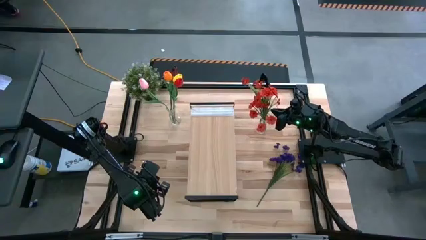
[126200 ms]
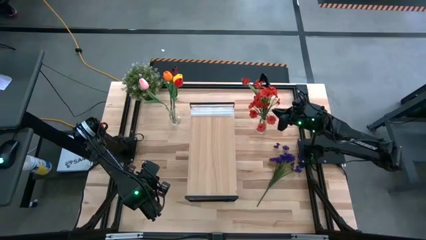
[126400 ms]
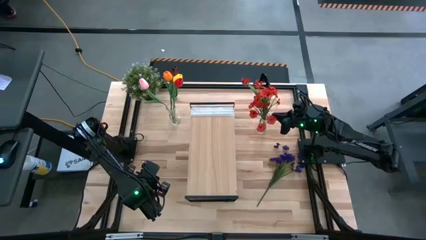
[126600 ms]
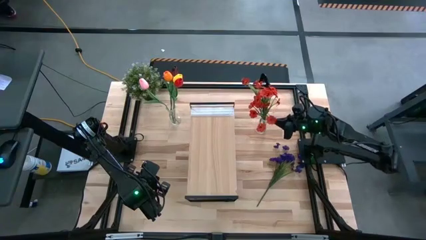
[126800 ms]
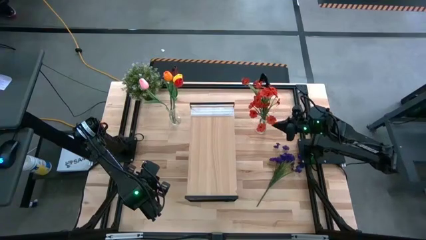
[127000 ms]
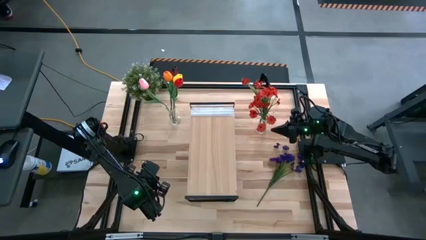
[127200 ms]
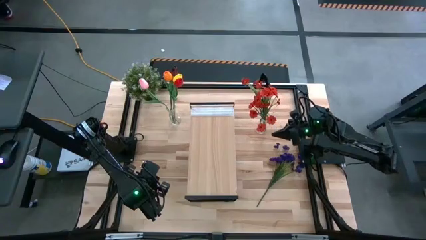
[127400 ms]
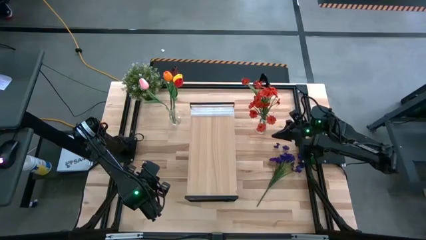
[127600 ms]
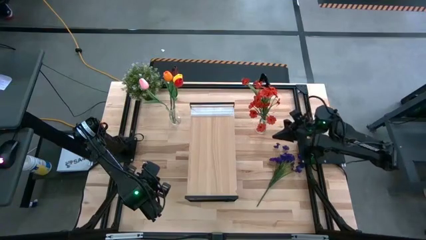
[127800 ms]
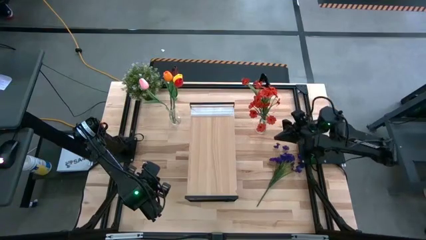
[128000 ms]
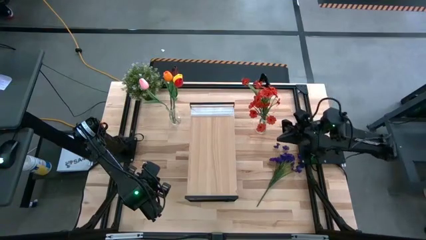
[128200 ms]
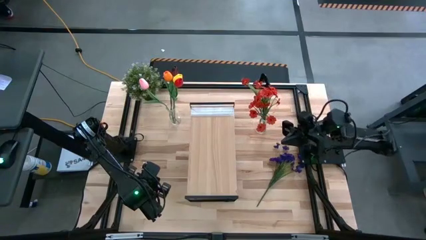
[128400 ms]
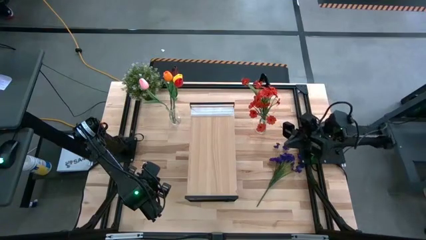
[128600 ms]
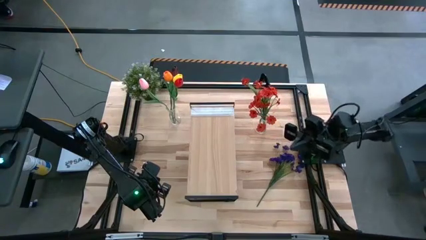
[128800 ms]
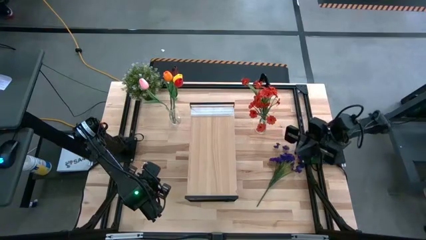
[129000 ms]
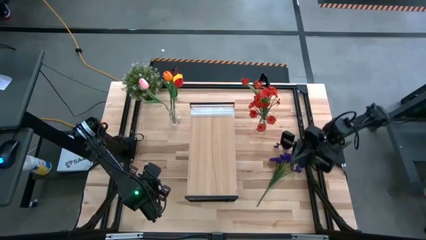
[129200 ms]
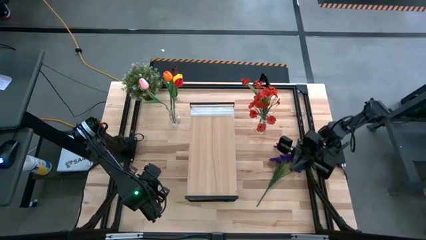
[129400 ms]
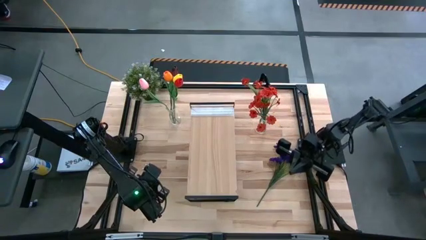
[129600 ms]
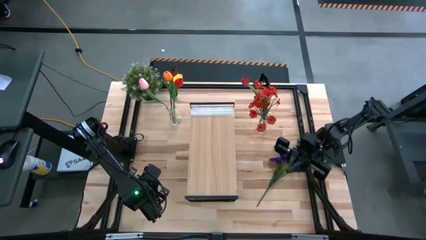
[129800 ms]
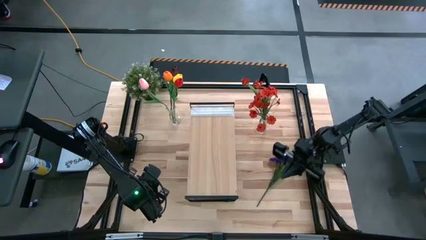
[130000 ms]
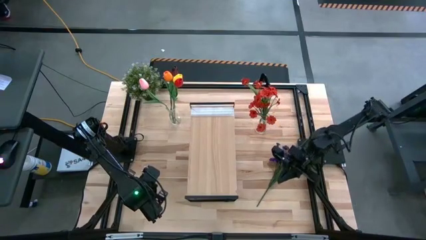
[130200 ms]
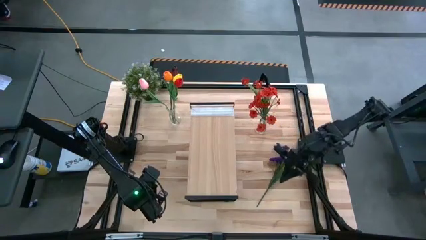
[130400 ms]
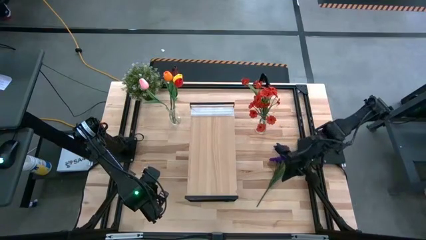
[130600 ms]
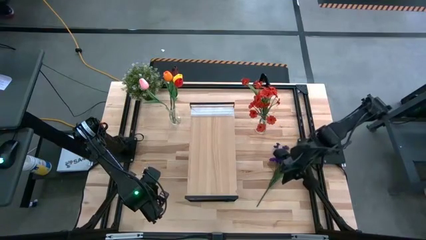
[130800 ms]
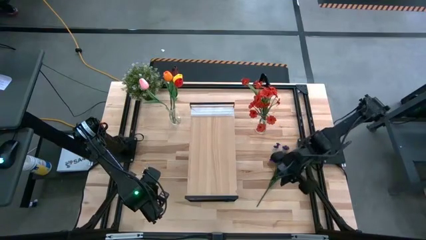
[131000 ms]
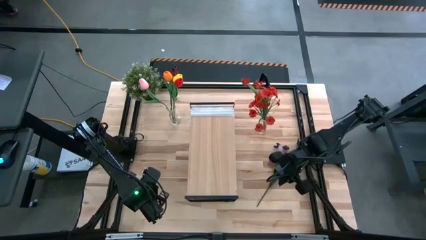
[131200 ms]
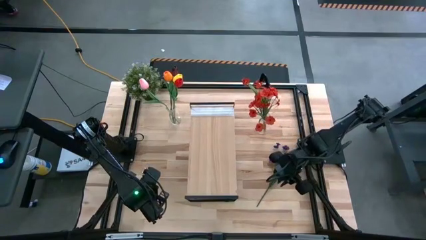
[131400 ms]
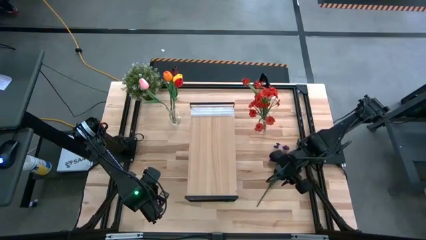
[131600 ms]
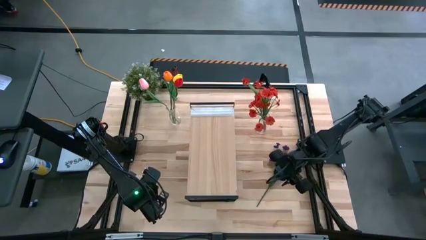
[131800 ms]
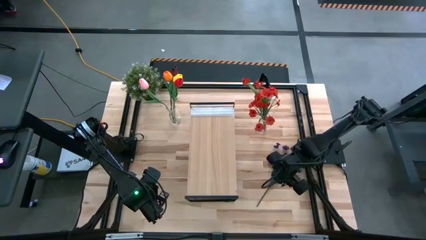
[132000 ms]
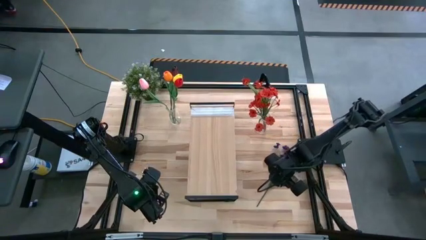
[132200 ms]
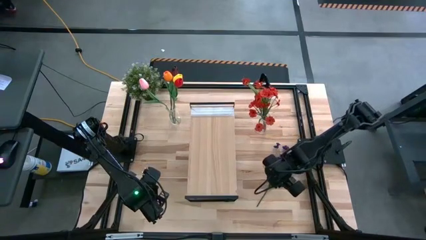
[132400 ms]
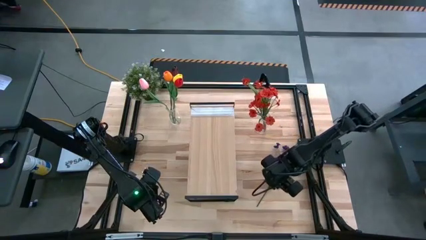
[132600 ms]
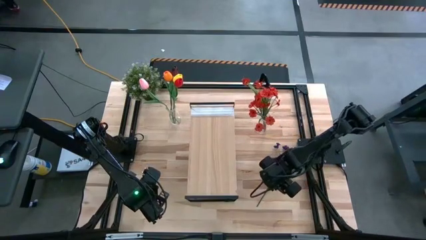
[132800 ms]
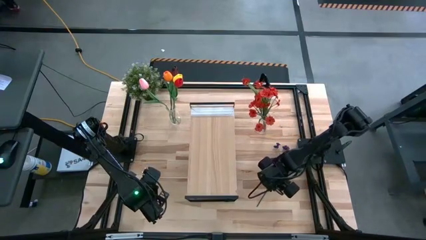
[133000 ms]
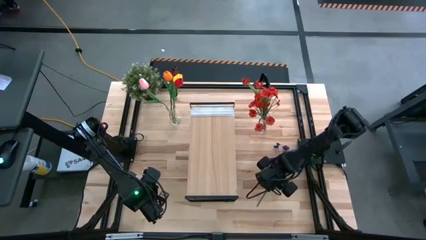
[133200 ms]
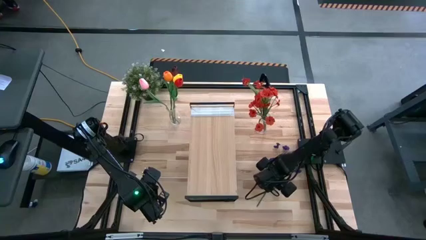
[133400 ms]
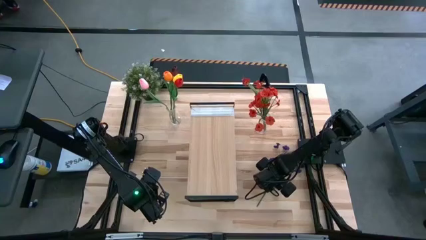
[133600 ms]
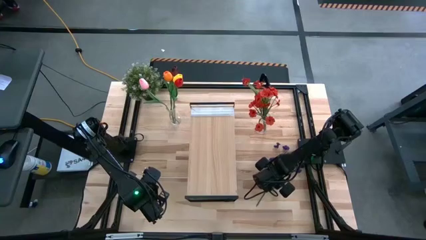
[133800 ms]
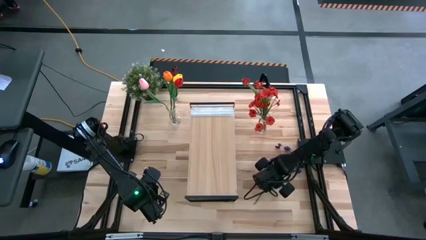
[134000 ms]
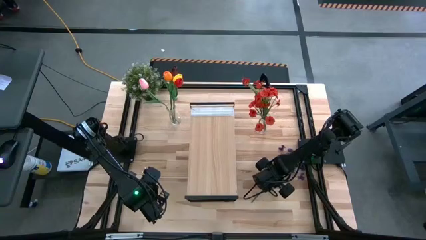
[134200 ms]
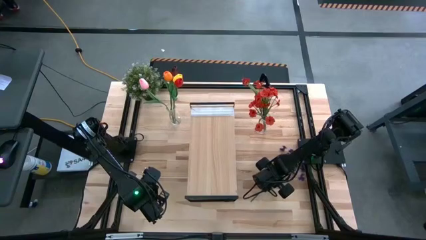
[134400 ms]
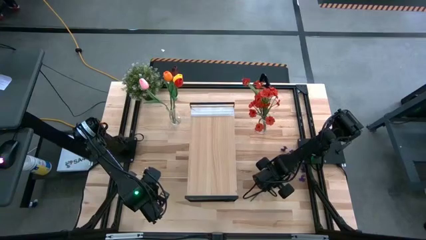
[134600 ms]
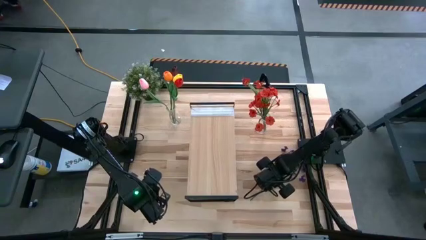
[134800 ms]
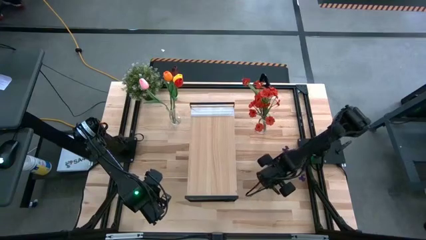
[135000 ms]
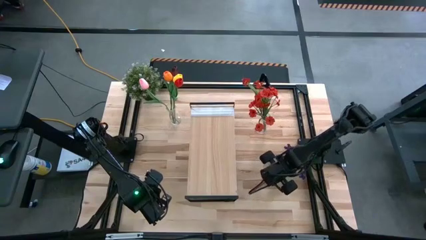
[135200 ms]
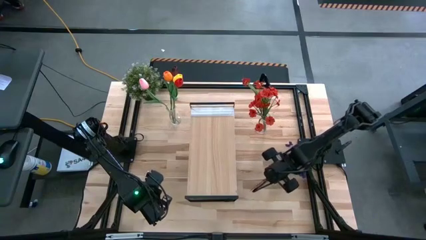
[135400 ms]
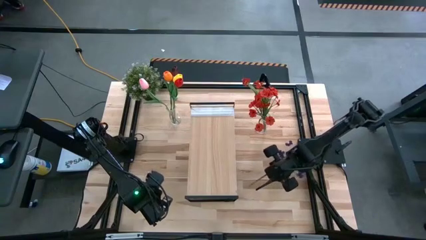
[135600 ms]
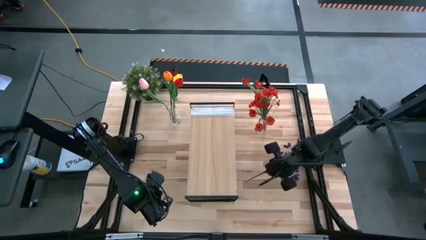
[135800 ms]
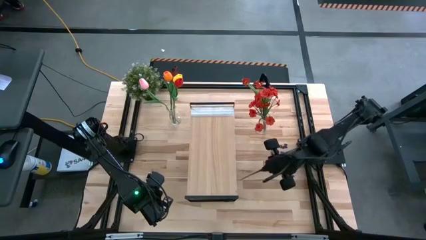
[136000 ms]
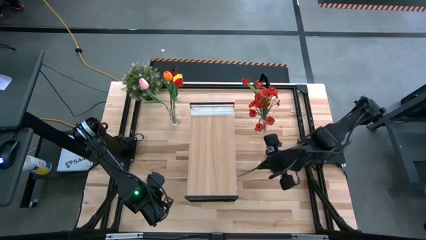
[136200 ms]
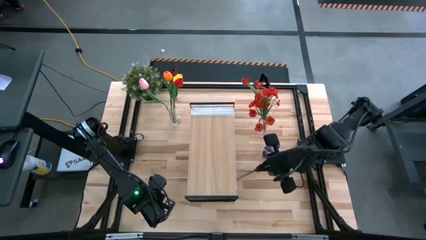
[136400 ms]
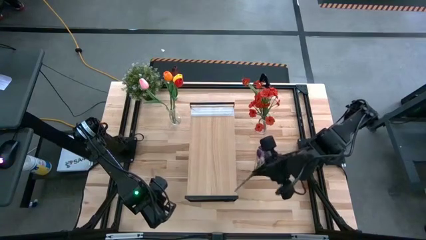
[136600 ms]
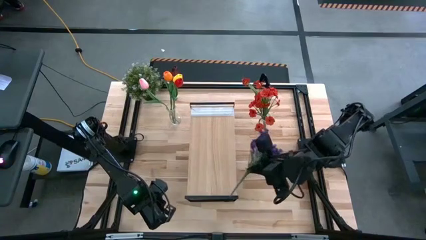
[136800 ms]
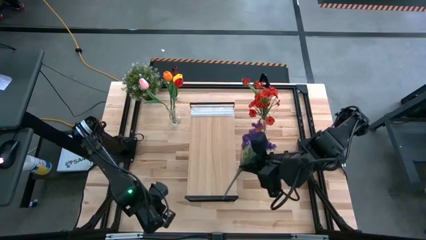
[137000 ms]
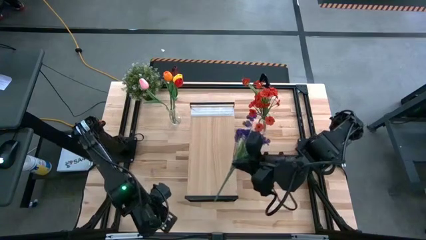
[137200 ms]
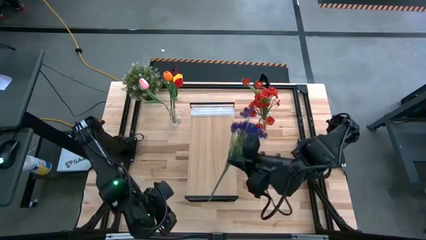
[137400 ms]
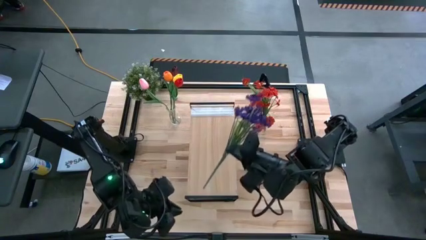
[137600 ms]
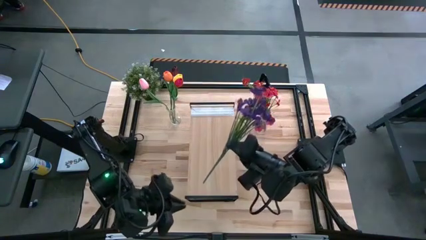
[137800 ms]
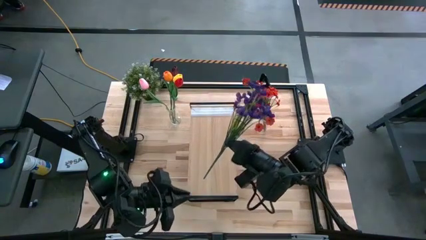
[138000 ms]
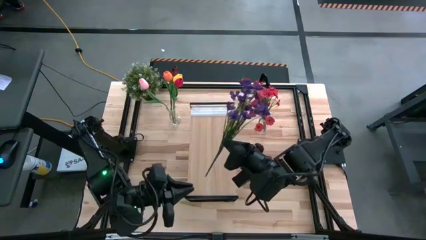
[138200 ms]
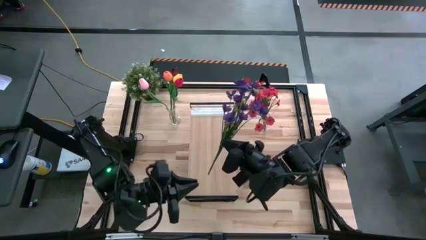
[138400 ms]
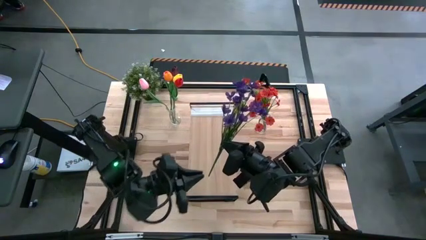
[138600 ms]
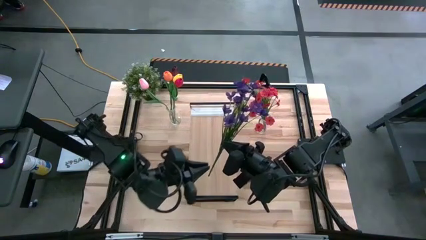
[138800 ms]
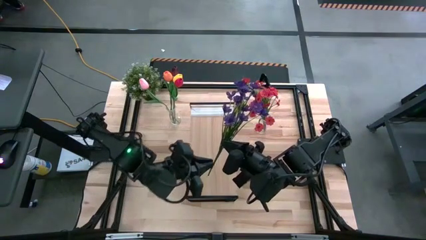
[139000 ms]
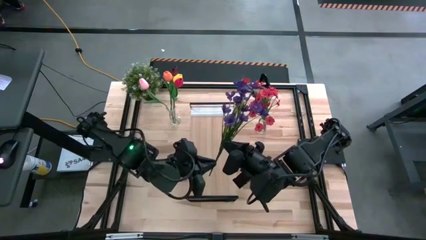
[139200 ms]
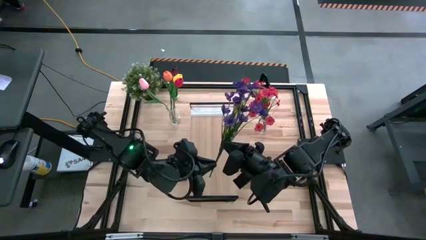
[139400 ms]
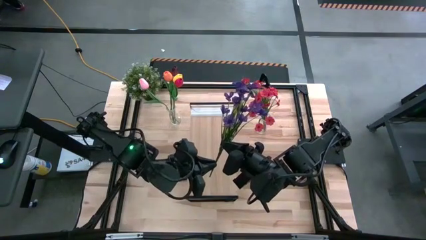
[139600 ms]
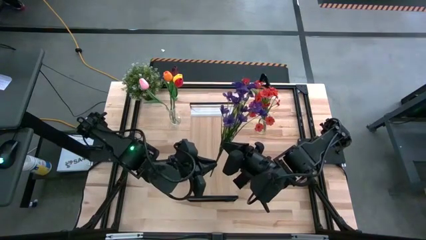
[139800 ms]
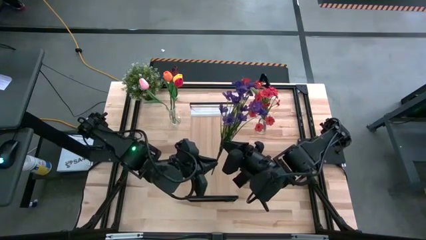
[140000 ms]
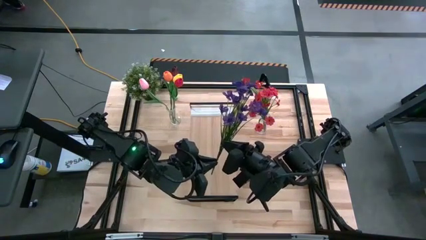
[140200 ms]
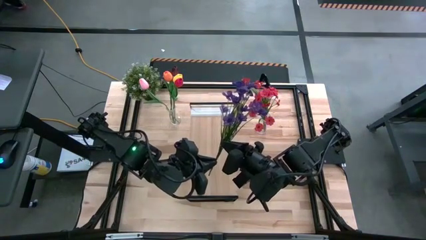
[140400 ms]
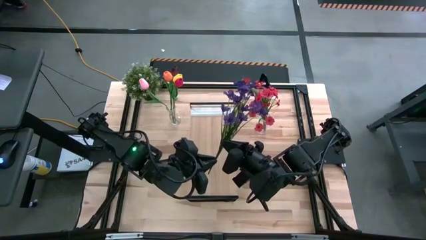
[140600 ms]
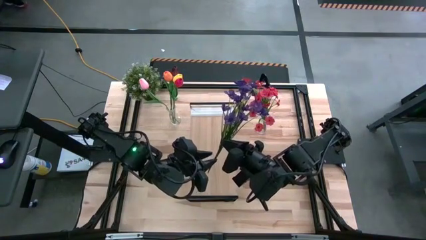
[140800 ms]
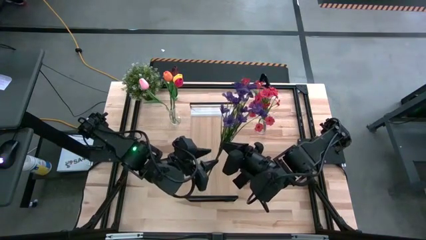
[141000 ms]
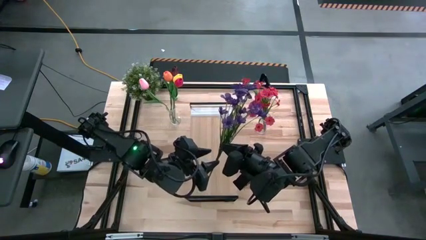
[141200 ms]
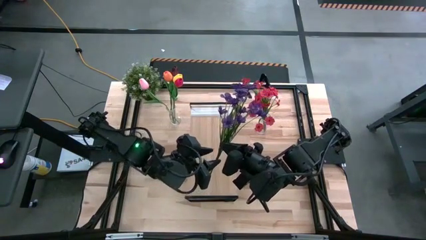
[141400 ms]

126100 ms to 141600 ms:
Task: Pick and place flowers into a vace then onto a shelf
Put the purple flowers into the right transparent vase

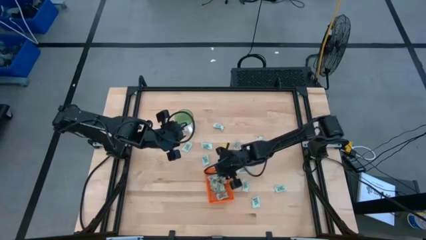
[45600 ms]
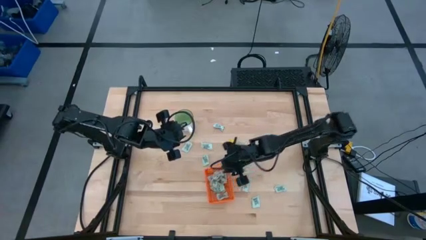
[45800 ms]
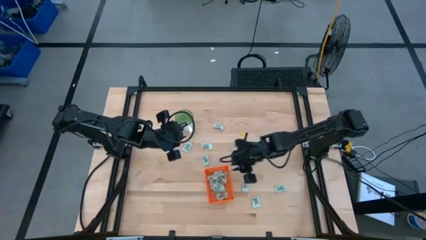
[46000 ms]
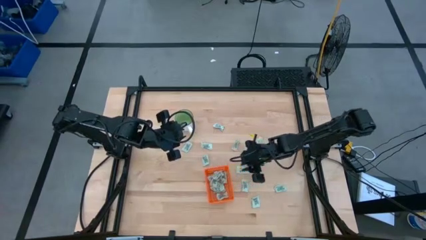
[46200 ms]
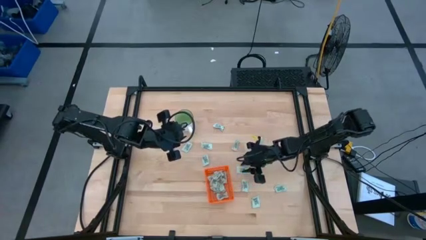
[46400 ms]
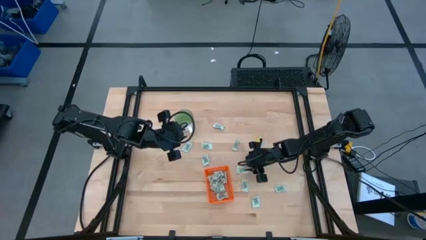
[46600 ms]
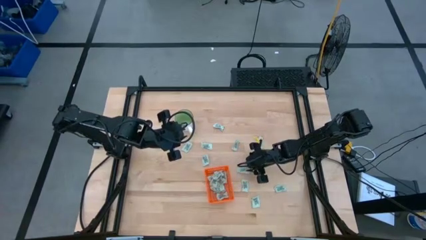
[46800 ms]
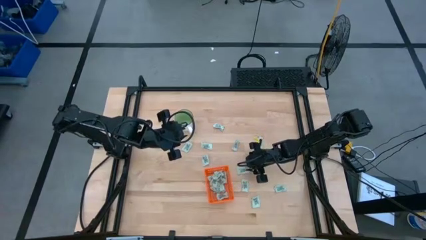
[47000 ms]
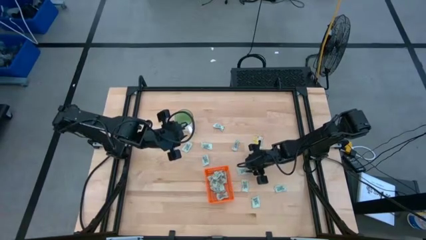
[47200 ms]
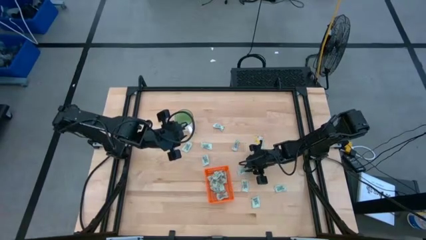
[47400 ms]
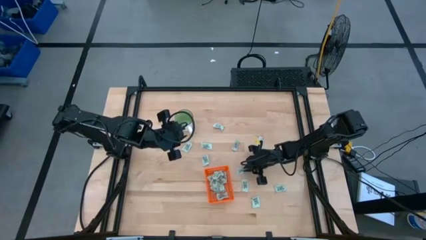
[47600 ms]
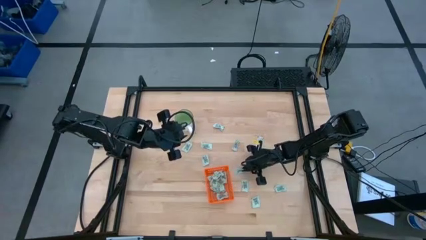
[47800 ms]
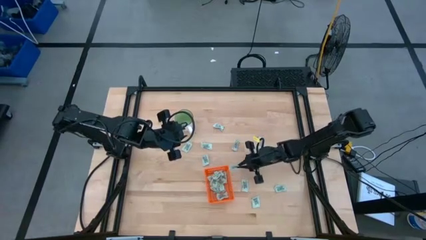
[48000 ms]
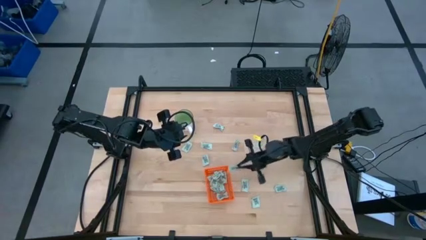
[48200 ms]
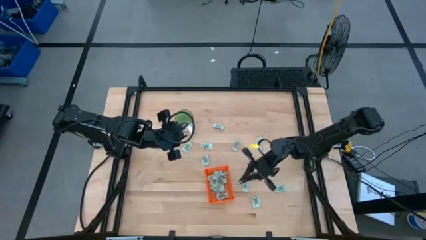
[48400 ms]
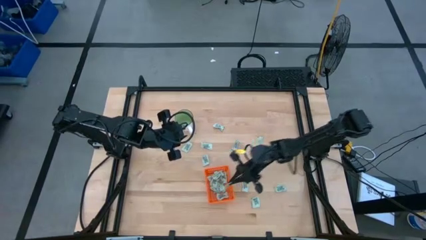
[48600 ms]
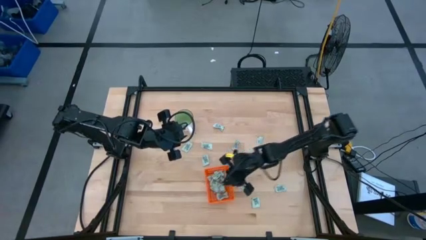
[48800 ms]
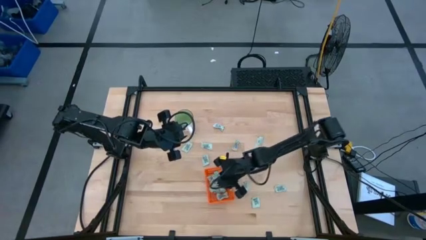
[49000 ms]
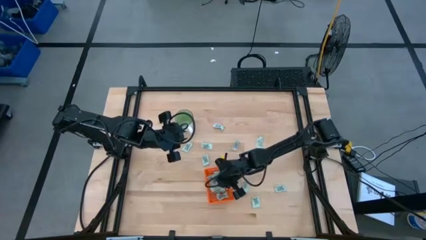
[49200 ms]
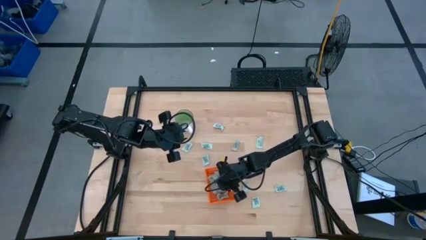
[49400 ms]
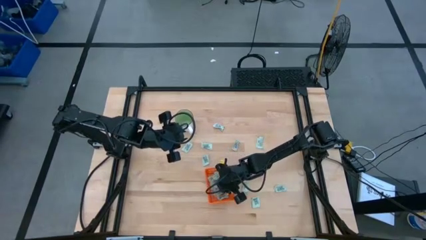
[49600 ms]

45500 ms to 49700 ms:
Task: Pick and place Stevia / Truvia into bins
Put the stevia packet into the orange basket
